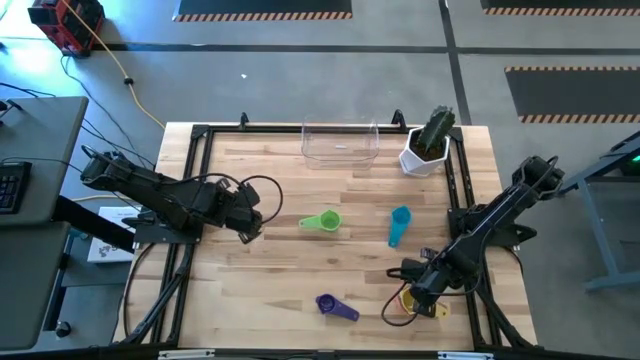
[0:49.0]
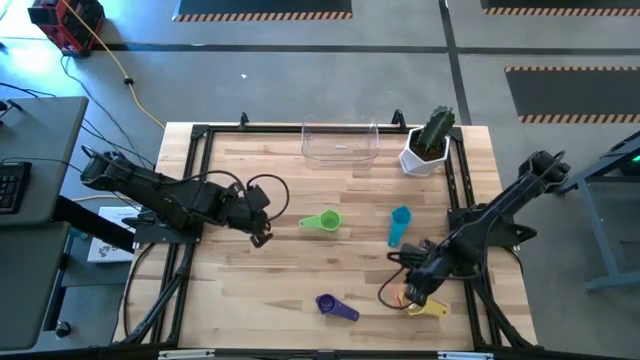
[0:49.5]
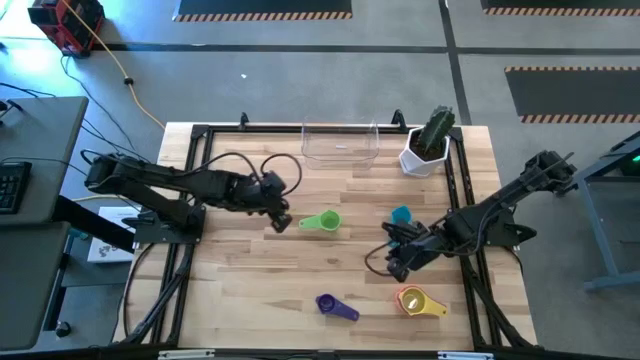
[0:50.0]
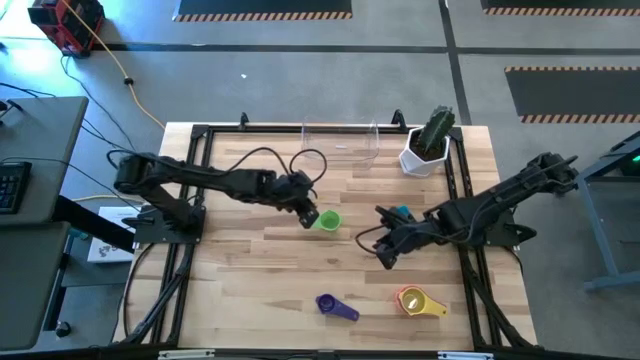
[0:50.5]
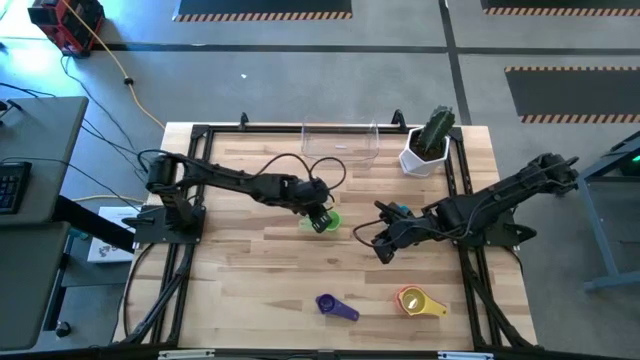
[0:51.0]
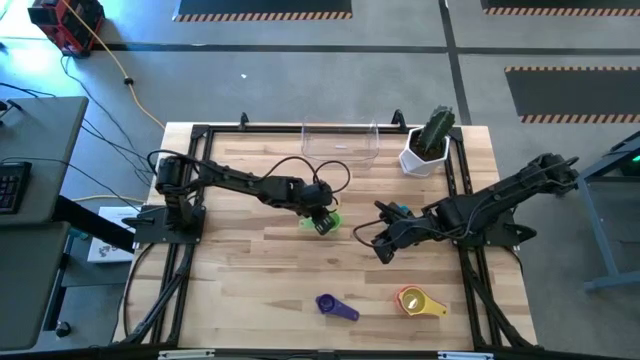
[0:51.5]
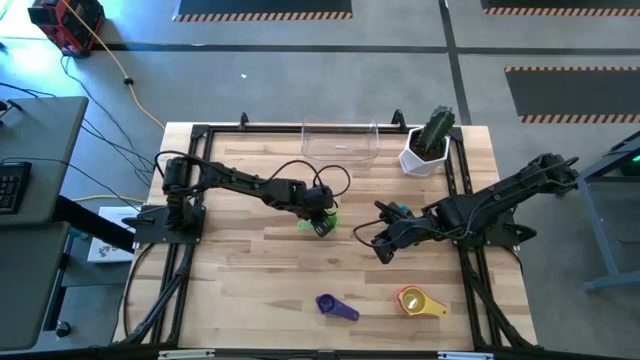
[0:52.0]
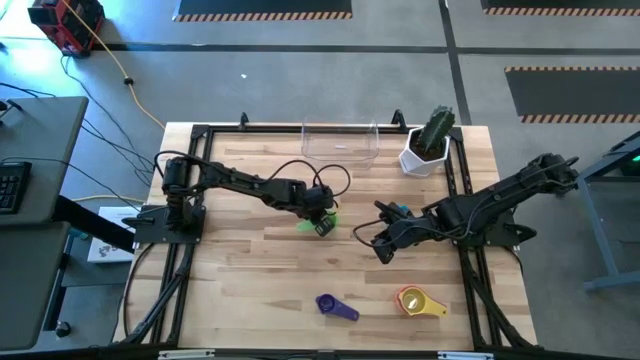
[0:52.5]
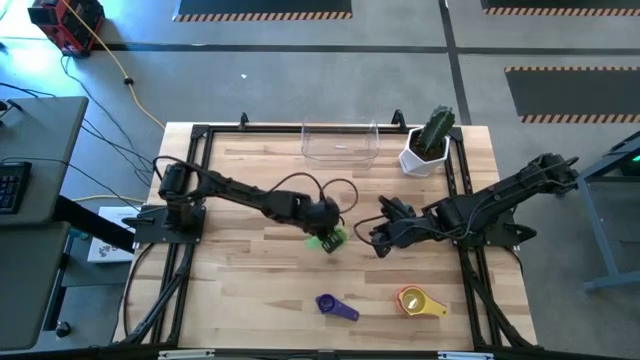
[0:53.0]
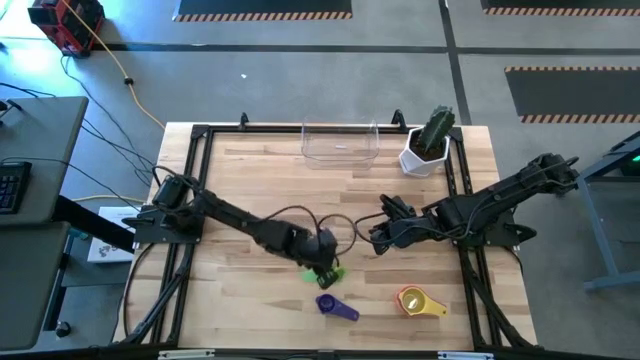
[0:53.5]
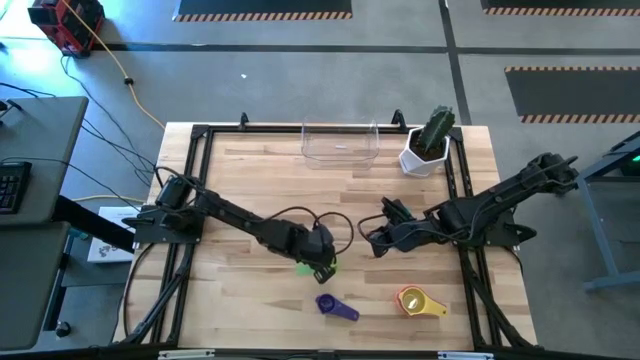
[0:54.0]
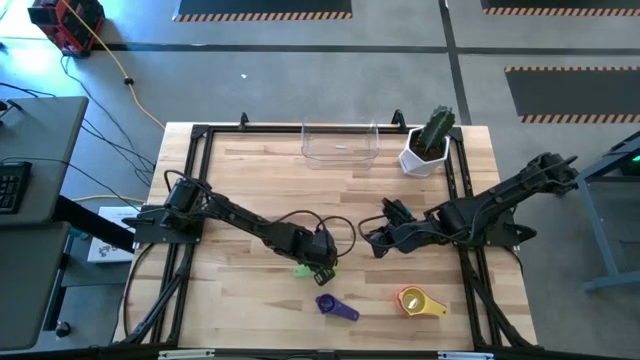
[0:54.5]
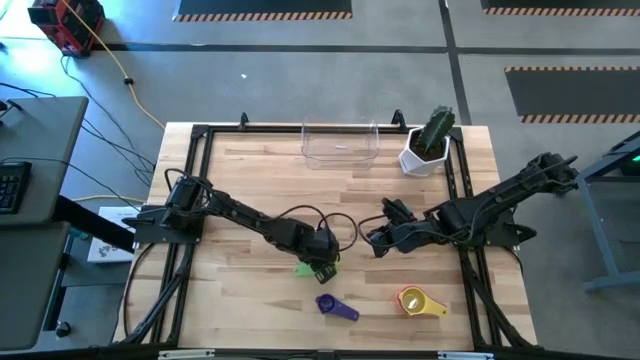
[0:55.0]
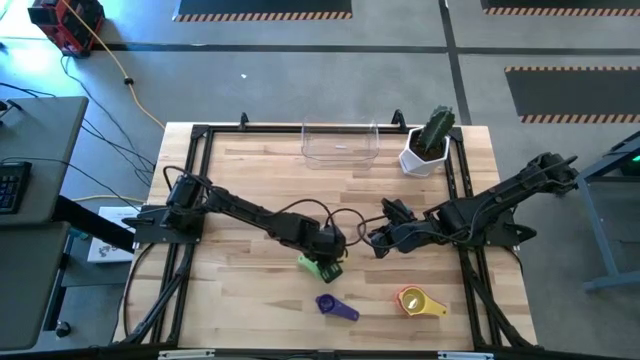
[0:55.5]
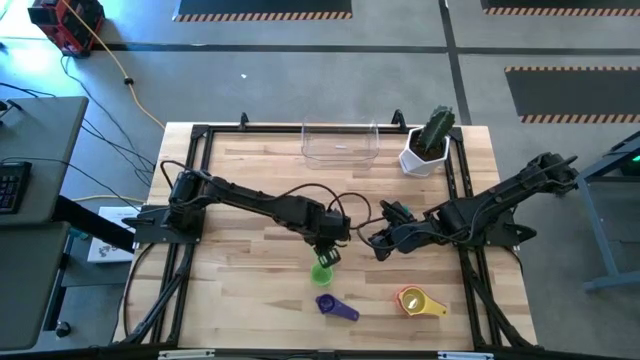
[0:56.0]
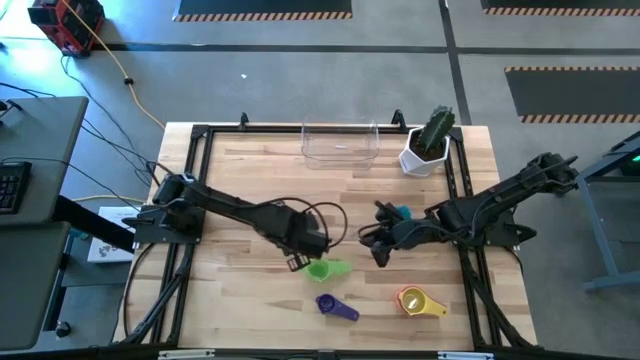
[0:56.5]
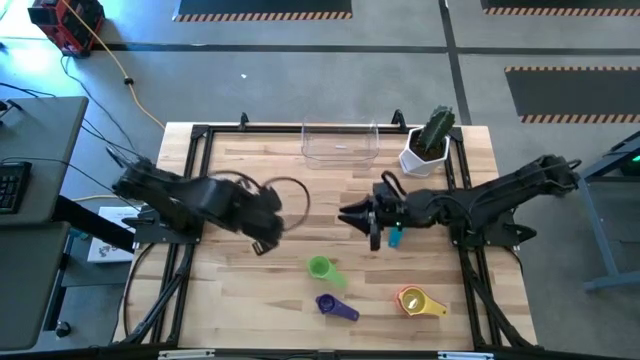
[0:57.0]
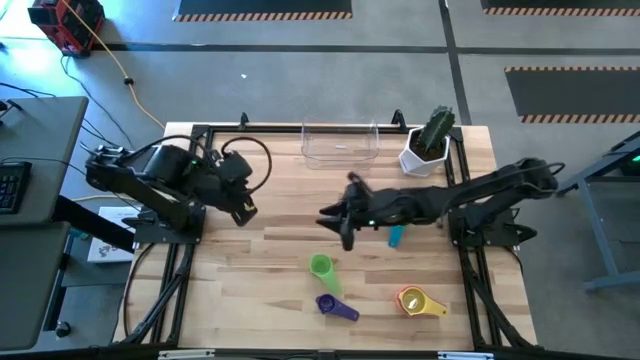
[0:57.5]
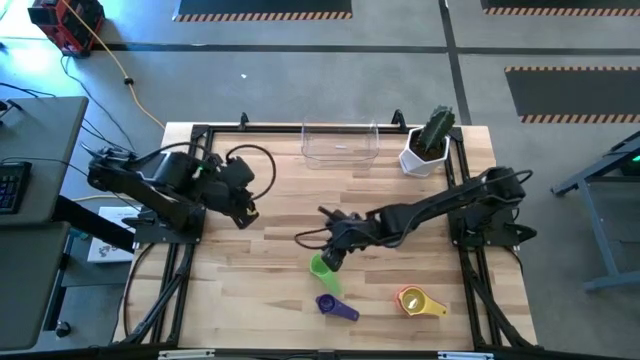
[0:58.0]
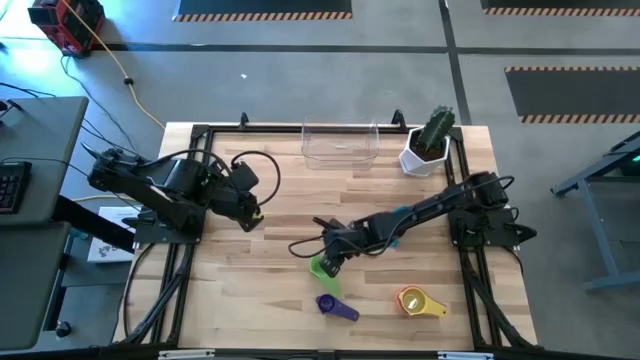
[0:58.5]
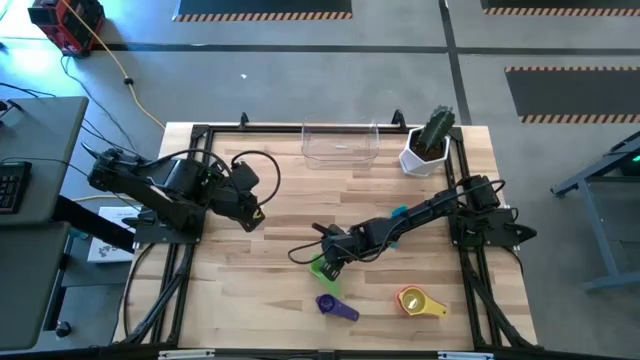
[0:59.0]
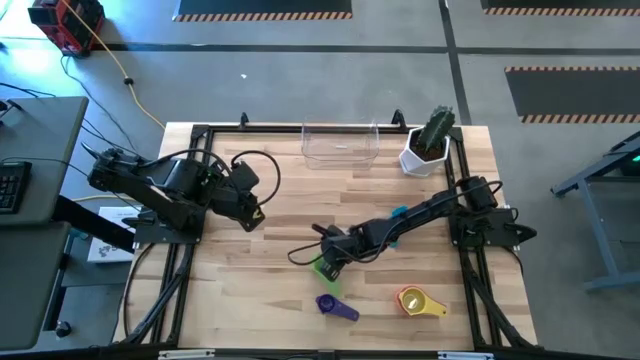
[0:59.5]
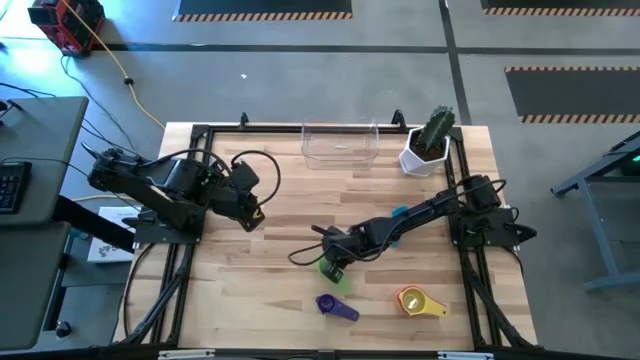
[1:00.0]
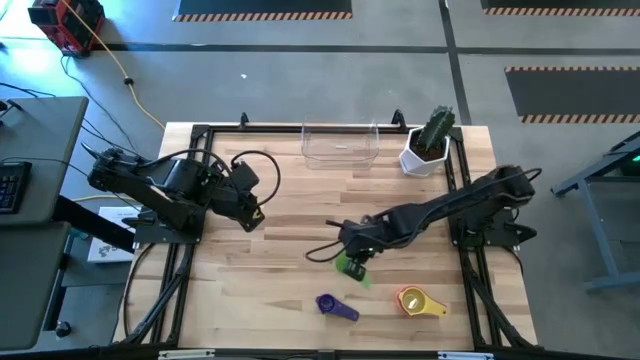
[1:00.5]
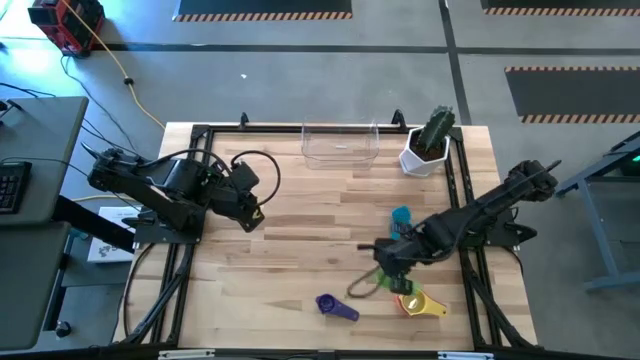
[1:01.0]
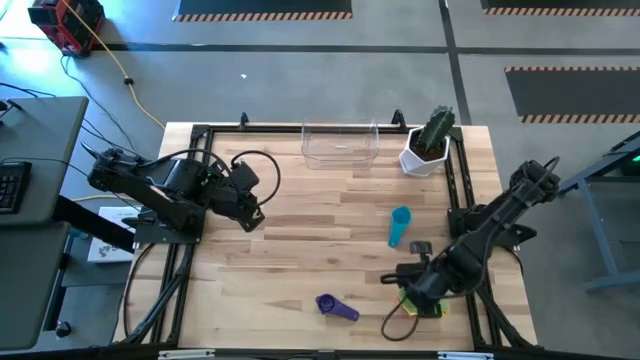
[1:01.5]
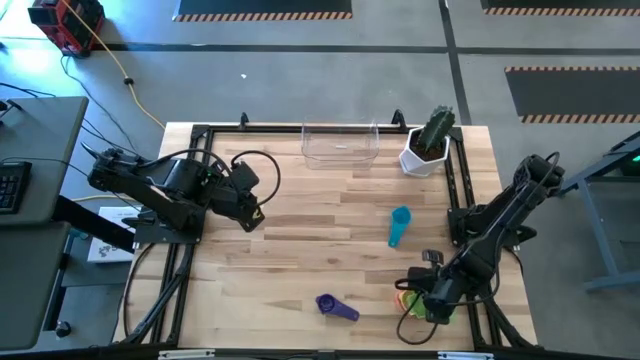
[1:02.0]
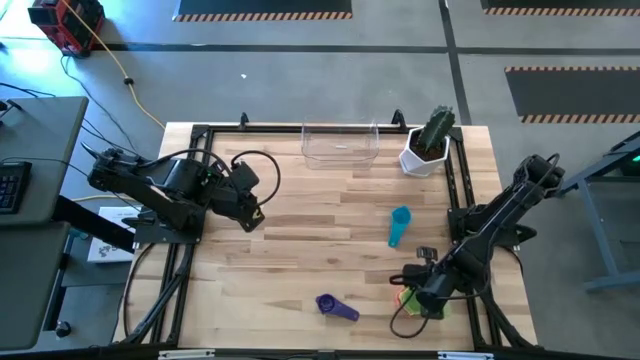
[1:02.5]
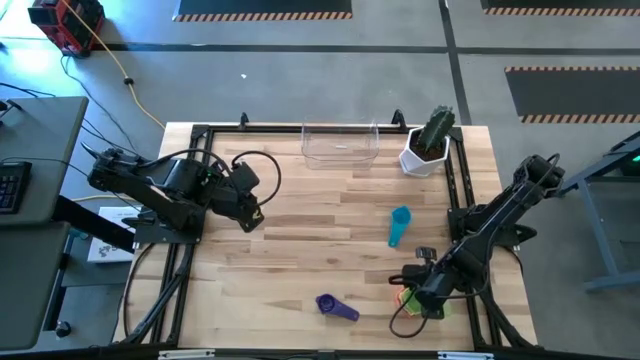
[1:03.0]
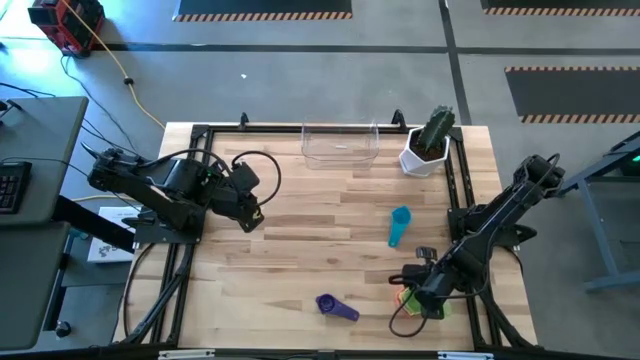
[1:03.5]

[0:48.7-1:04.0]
Task: Nest measuring cups in basket
Stack the green measuring cup on the top of the yellow measuring cup

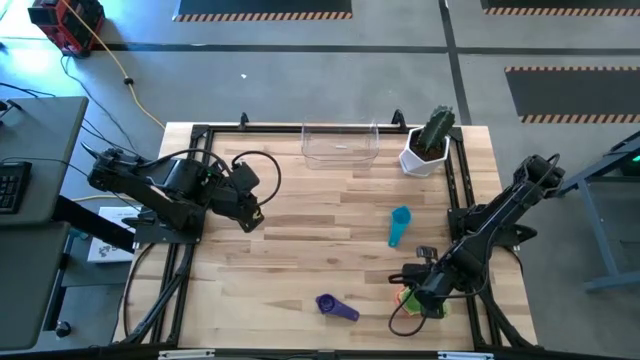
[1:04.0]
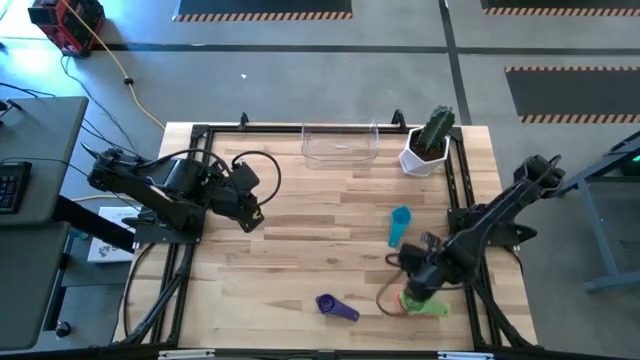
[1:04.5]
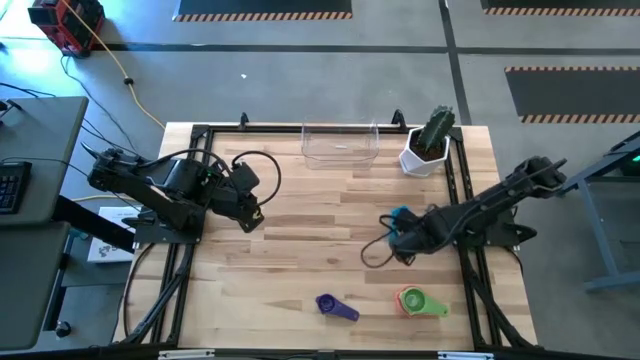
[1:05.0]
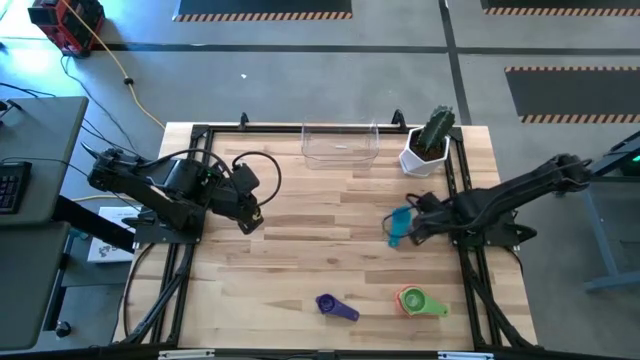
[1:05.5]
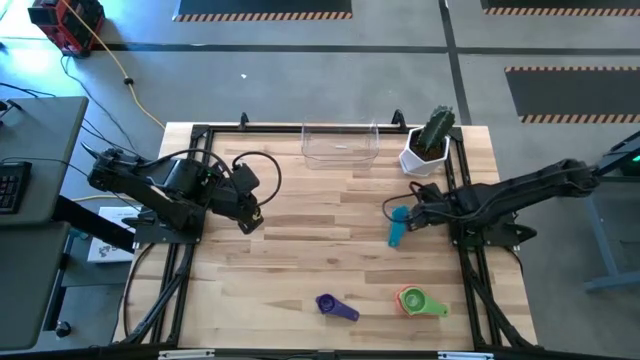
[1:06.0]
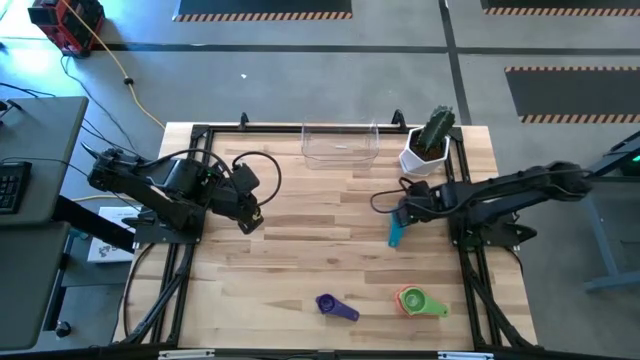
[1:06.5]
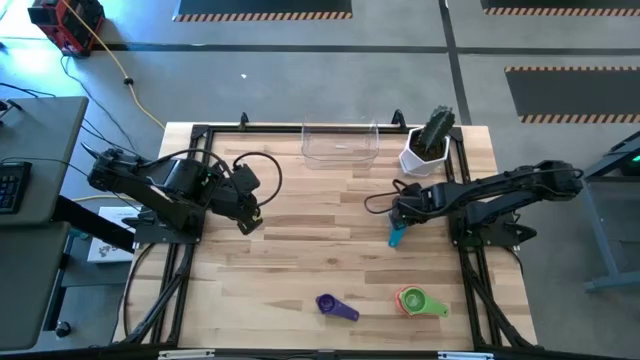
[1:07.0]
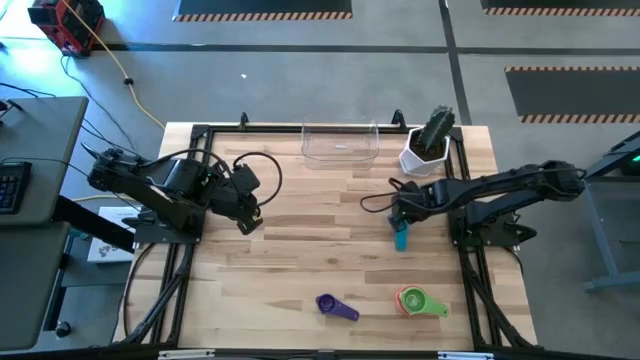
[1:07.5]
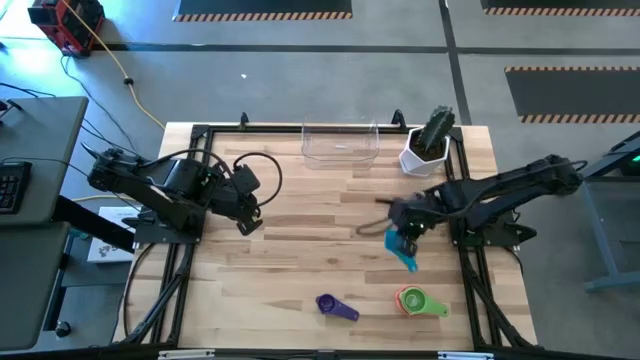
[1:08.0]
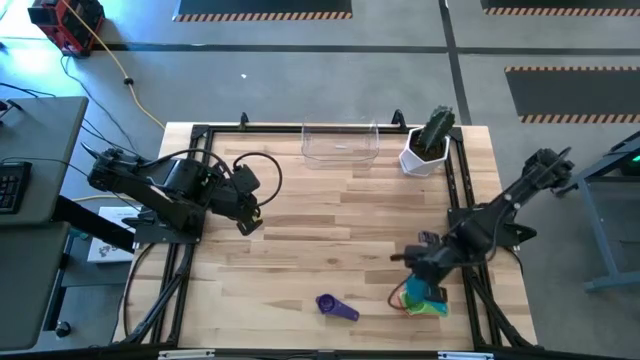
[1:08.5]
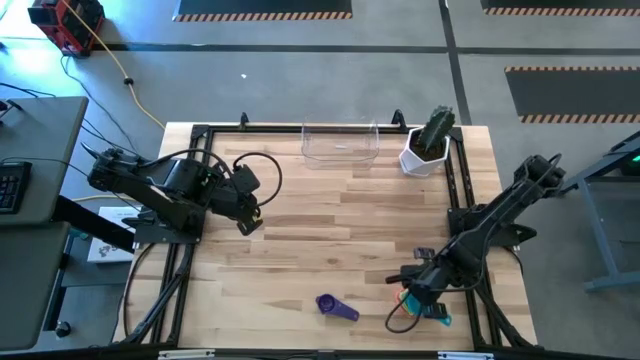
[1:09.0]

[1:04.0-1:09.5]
Stack the light blue measuring cup on the top of the green measuring cup

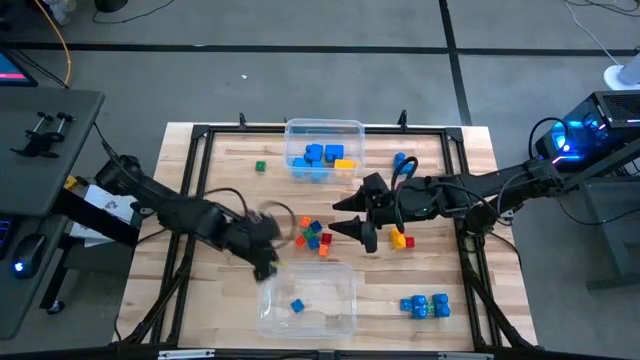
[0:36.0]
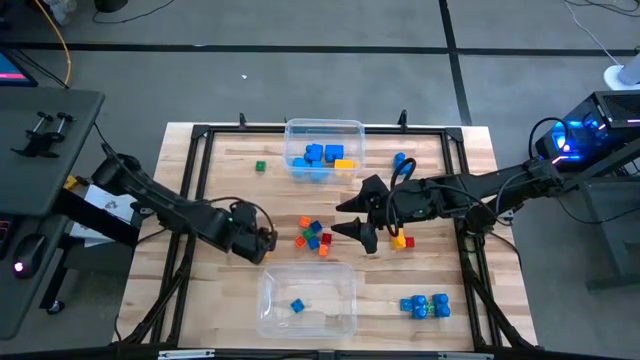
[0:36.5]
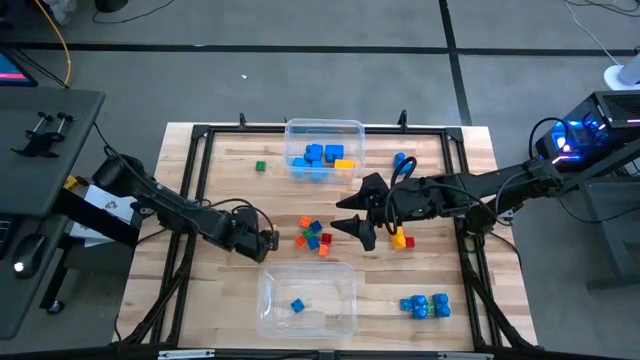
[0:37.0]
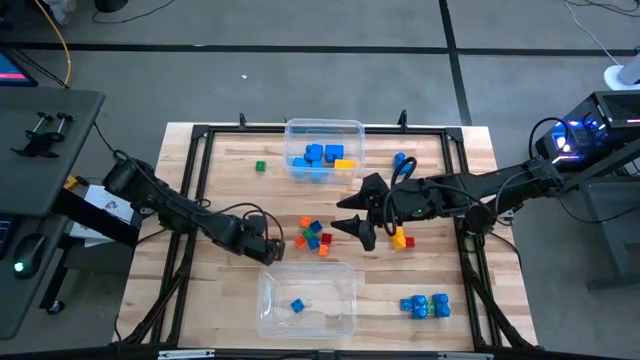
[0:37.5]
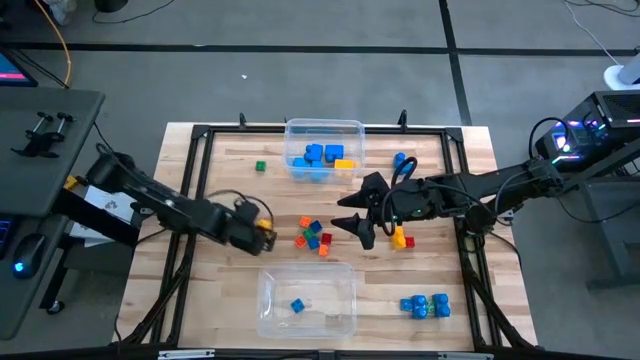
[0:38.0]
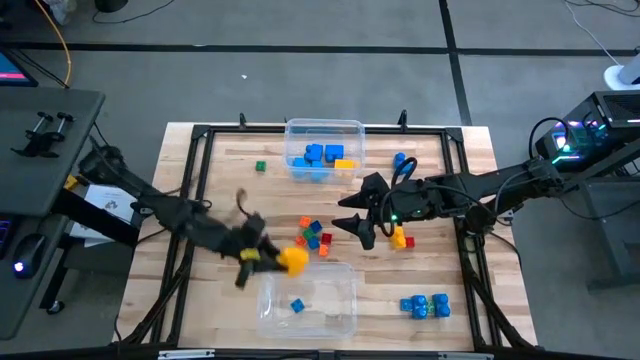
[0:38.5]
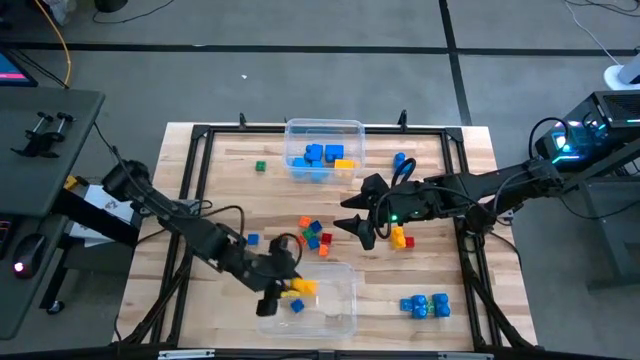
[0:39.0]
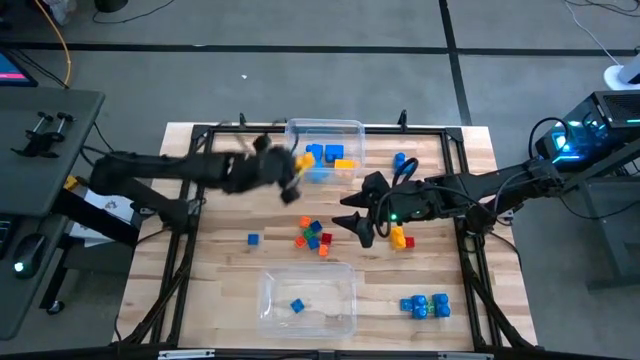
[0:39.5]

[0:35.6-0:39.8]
Task: Sort blocks by size
Put the large yellow game piece into the top transparent bin
